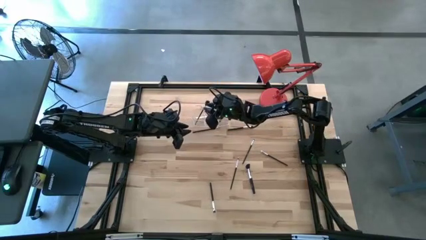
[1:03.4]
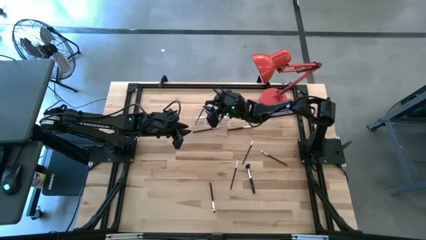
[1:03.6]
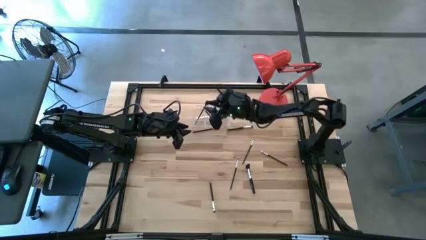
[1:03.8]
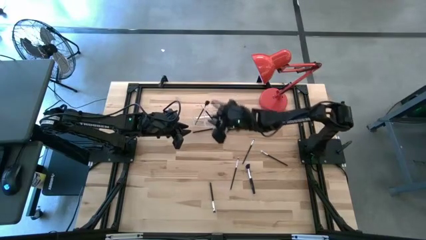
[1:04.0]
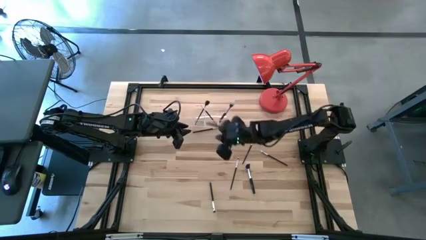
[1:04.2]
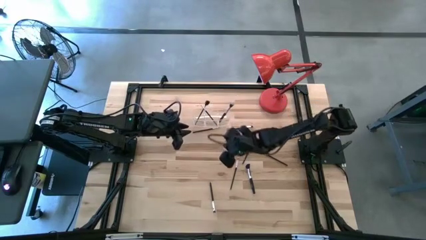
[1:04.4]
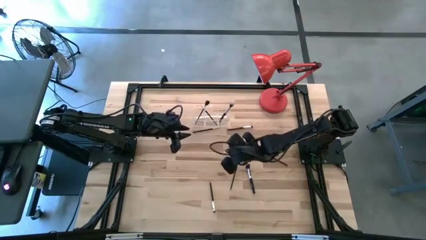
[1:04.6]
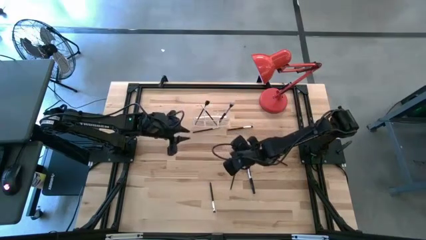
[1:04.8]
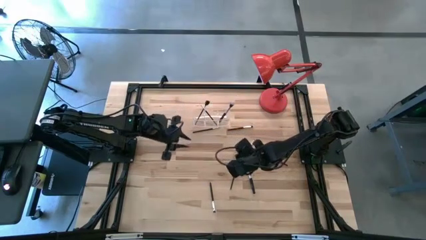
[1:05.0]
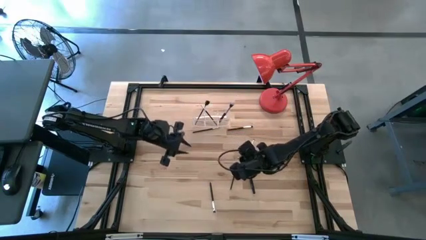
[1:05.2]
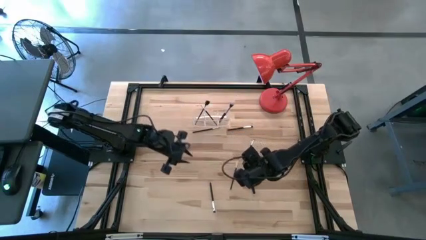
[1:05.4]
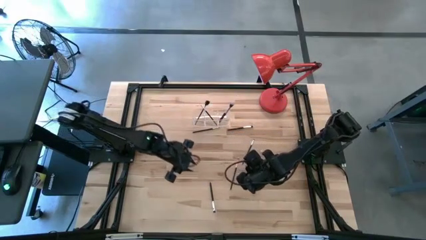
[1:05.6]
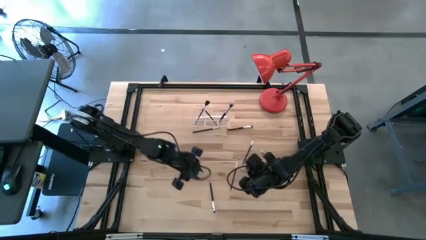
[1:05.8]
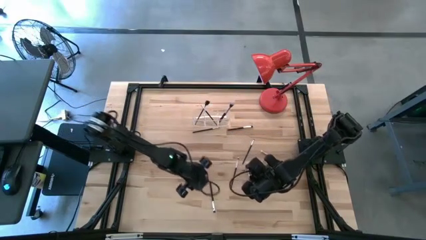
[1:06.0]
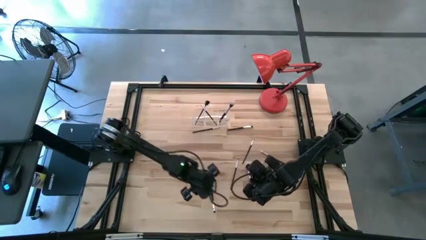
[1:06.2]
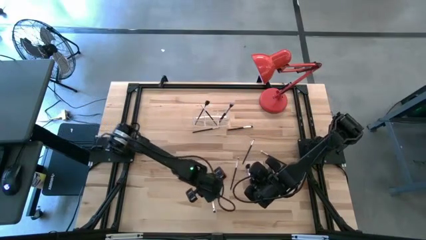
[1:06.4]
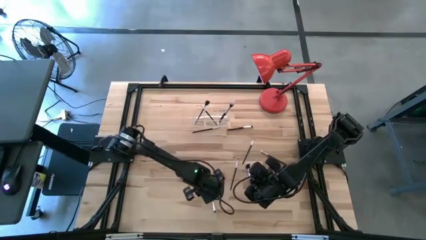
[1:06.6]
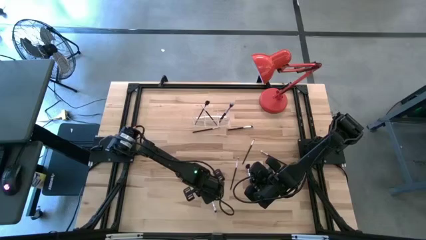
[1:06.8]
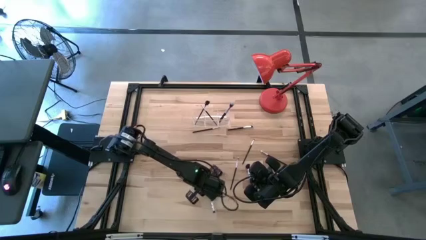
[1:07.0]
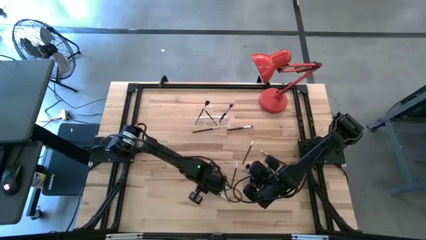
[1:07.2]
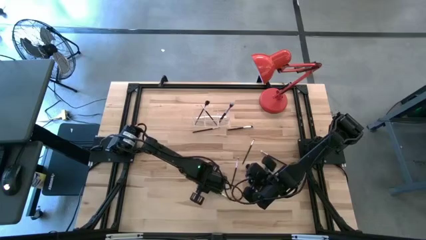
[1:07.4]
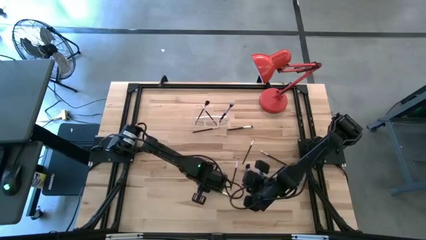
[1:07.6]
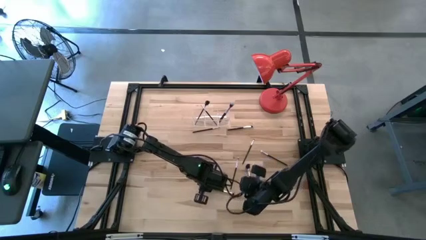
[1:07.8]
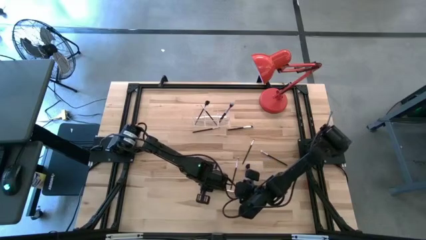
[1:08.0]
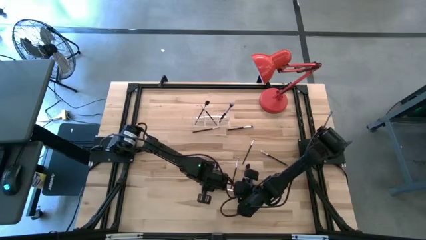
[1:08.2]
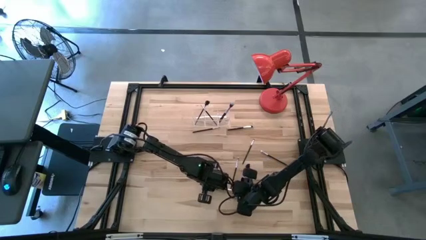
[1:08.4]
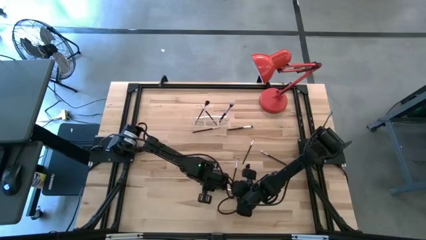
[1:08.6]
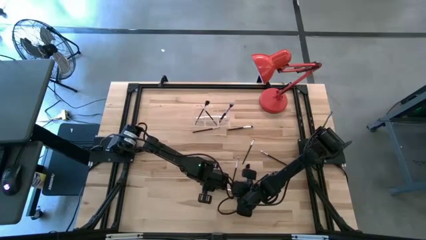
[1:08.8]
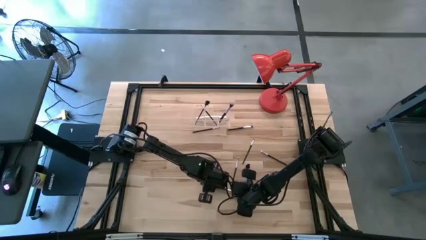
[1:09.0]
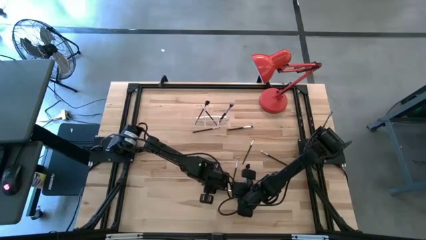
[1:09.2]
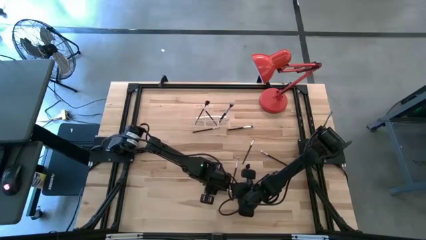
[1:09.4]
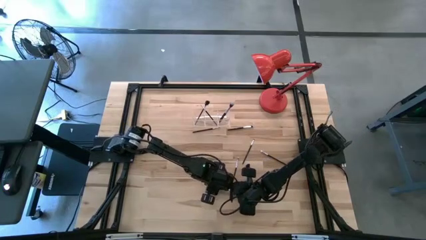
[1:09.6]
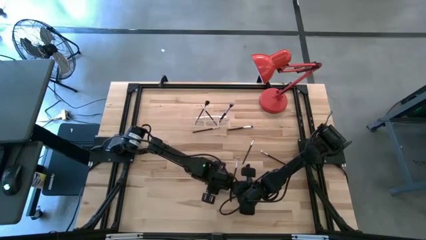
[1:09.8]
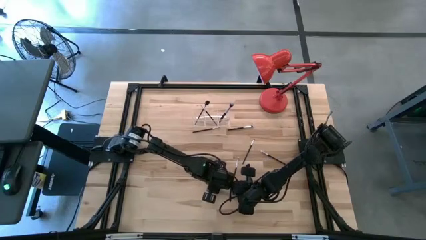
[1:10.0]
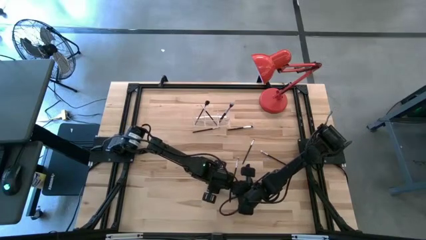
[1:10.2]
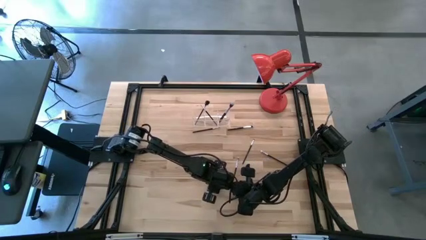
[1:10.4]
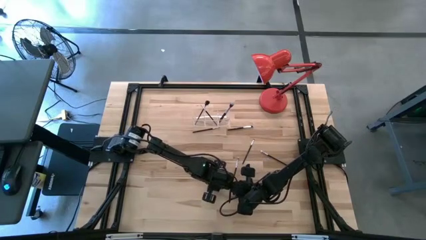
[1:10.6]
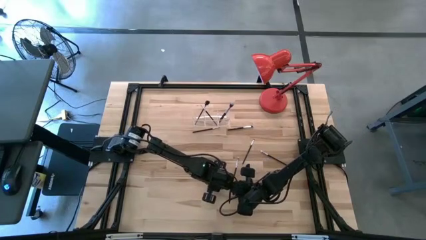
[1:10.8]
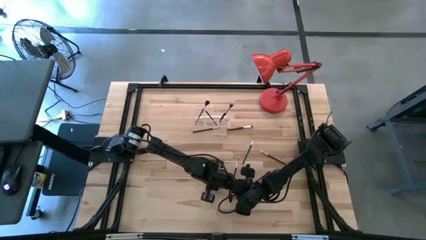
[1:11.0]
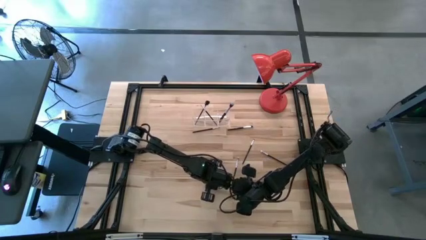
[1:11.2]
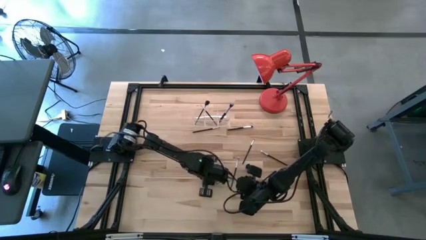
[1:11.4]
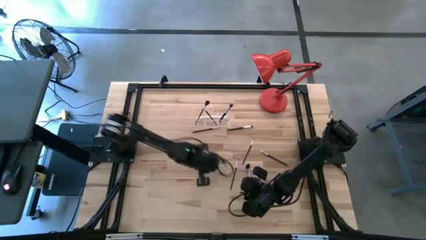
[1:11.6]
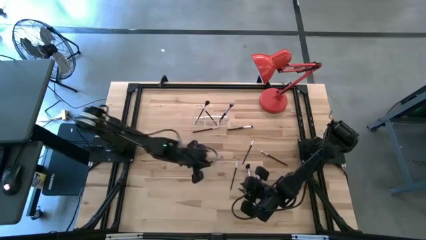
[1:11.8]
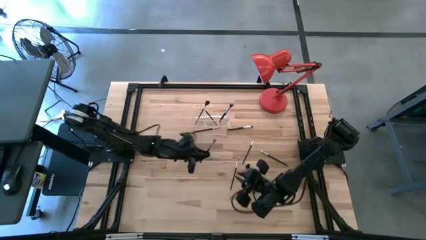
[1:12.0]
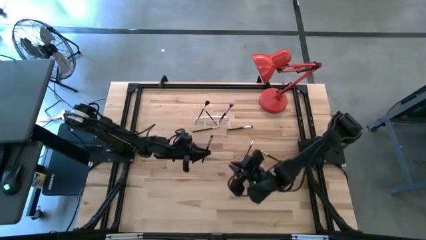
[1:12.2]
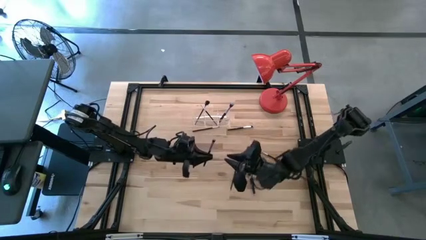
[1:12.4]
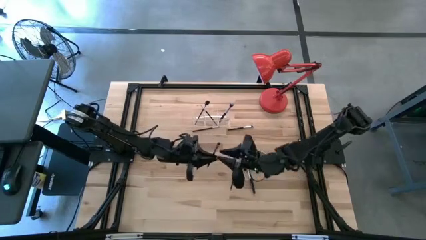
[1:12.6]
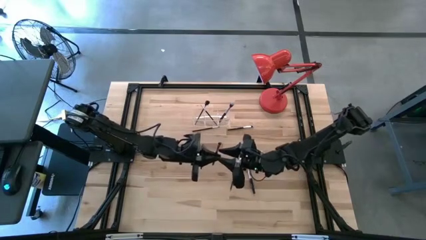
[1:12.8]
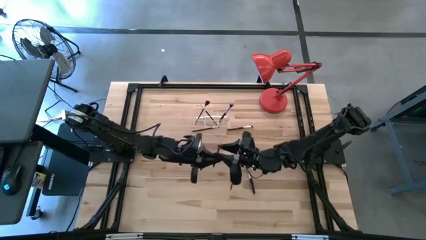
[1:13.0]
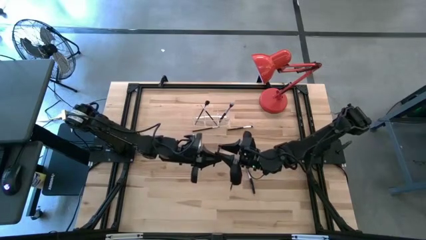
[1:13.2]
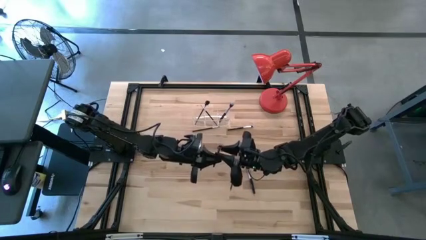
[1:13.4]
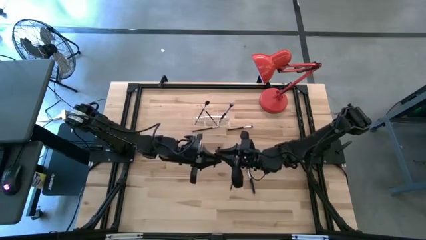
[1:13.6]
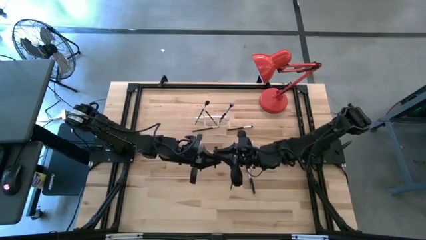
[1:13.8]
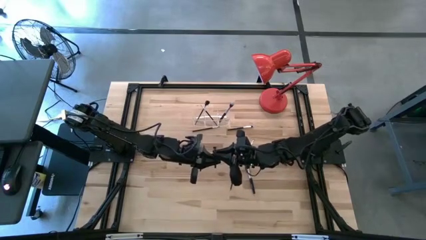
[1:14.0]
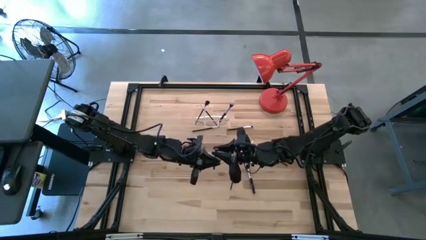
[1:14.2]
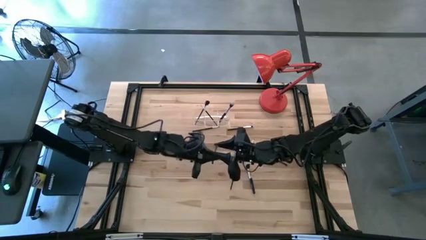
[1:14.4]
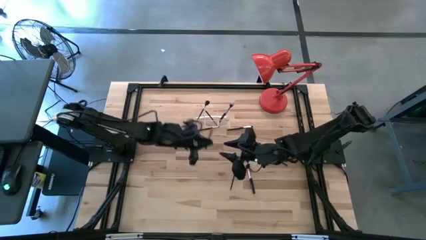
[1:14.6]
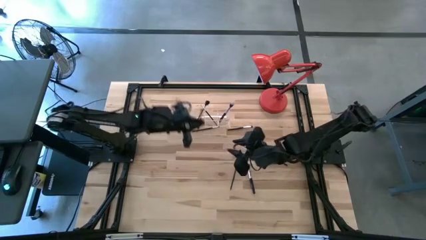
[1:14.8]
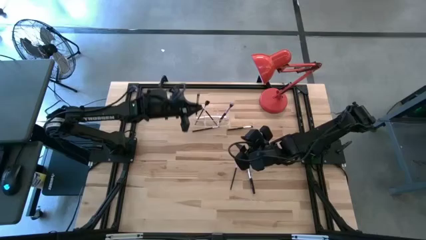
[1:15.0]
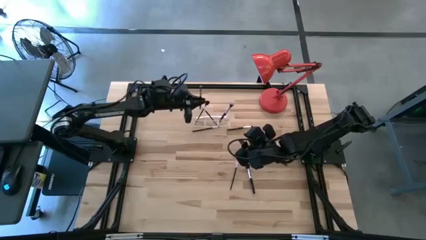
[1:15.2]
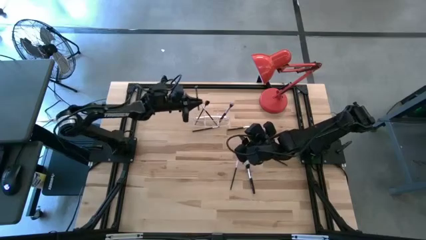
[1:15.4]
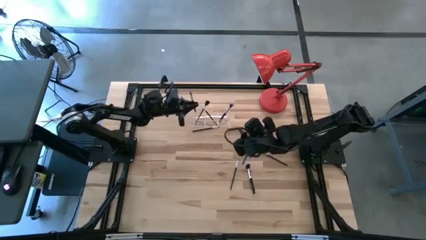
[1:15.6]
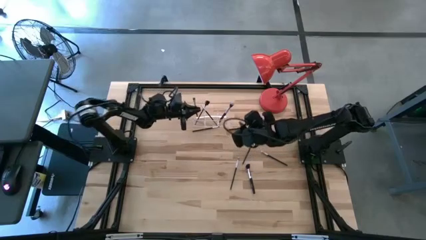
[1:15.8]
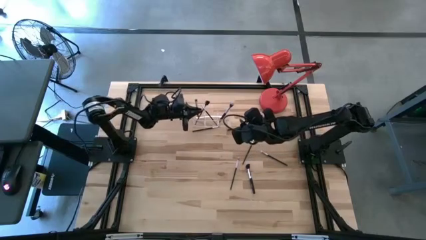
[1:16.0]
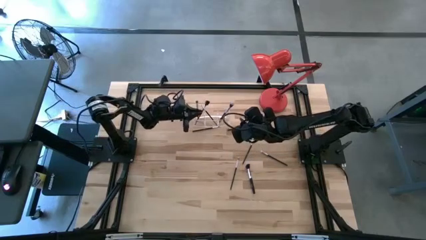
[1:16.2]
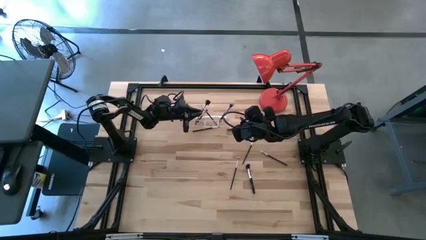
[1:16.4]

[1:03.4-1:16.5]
Task: Put items in baskets/containers
Put the black foundation brush into the transparent organizer

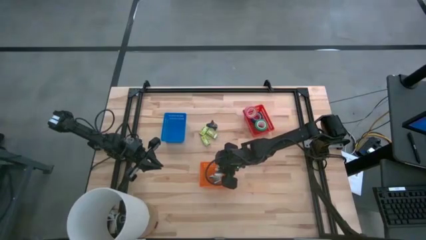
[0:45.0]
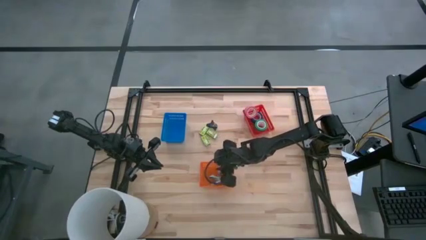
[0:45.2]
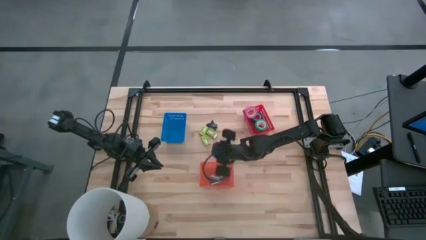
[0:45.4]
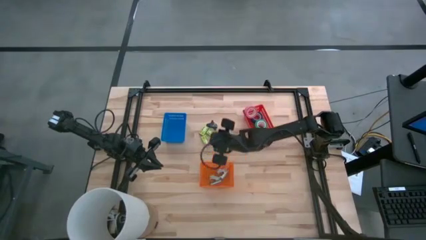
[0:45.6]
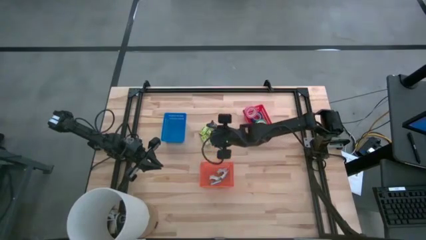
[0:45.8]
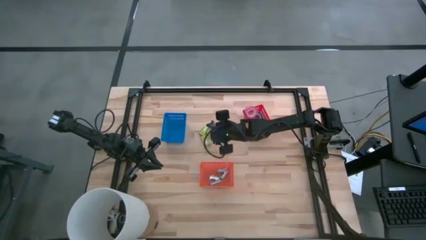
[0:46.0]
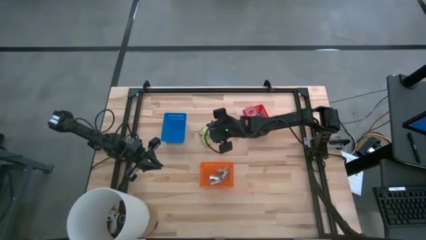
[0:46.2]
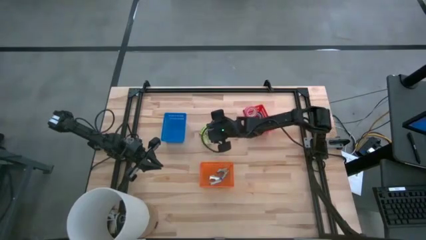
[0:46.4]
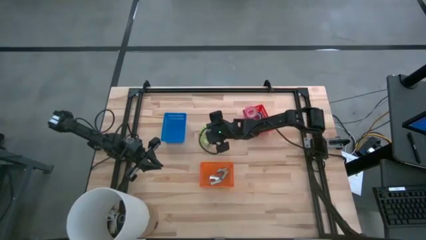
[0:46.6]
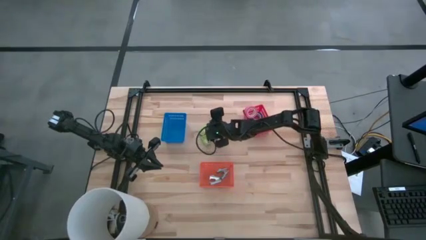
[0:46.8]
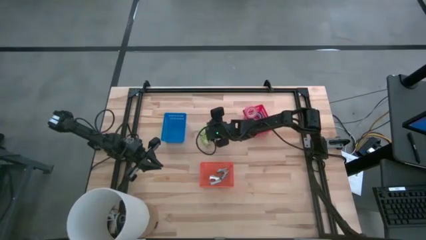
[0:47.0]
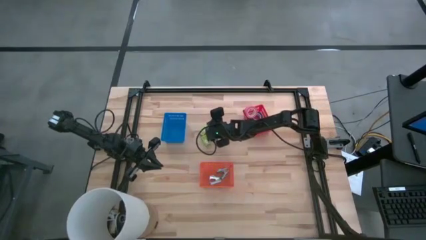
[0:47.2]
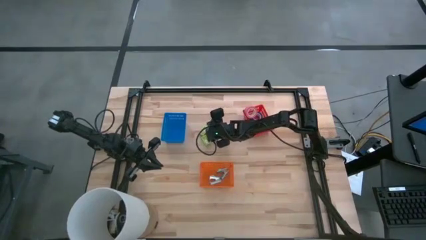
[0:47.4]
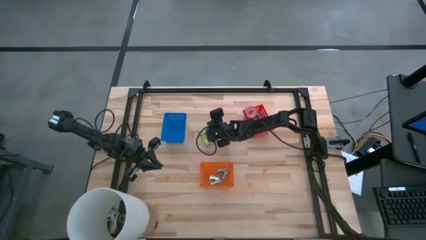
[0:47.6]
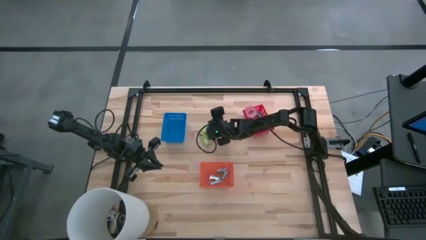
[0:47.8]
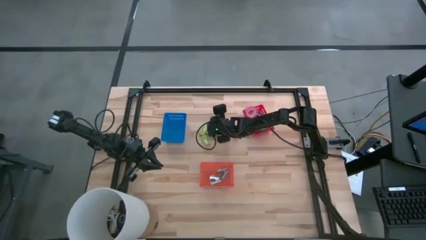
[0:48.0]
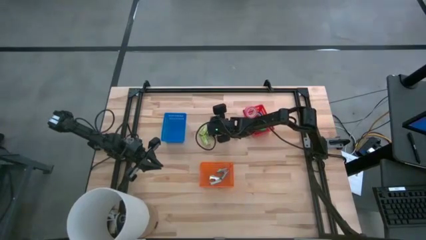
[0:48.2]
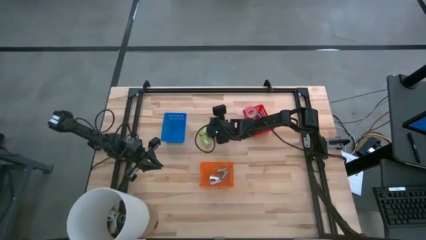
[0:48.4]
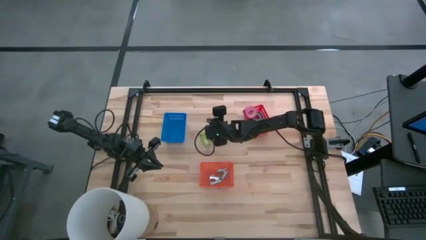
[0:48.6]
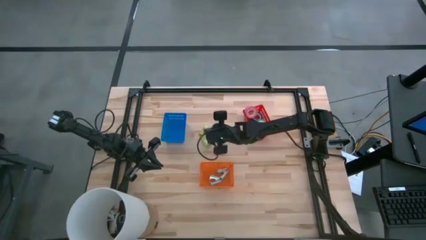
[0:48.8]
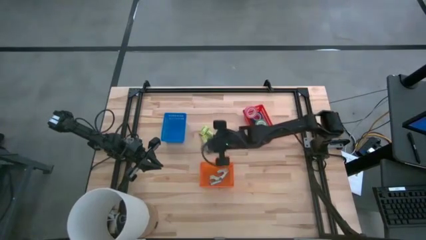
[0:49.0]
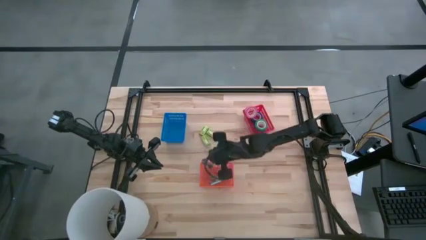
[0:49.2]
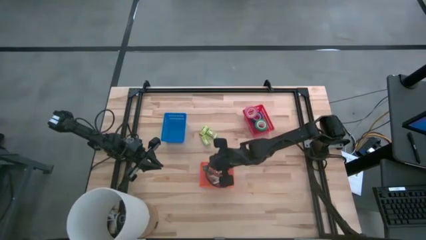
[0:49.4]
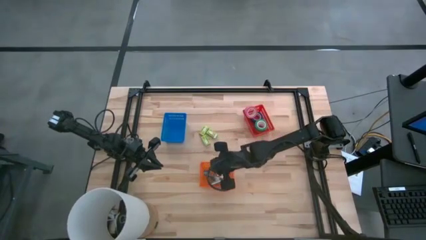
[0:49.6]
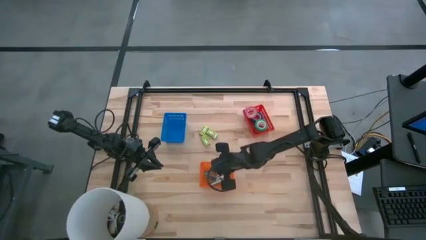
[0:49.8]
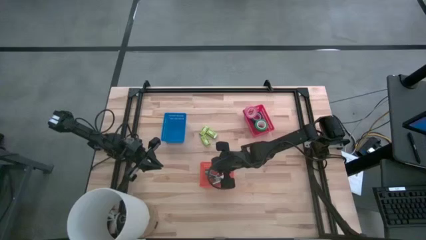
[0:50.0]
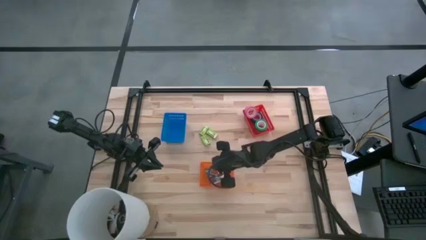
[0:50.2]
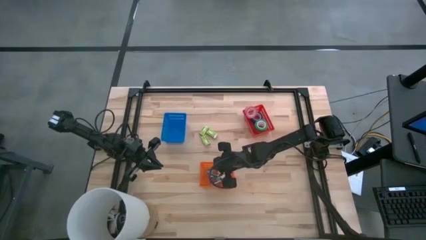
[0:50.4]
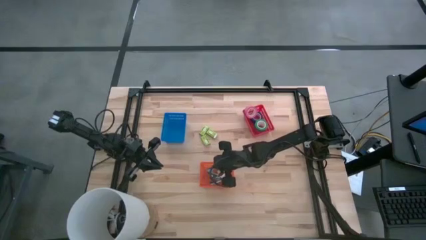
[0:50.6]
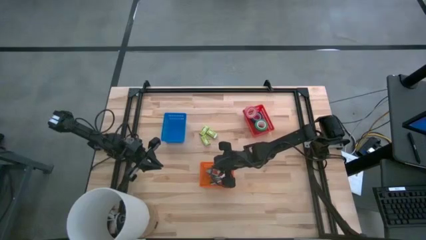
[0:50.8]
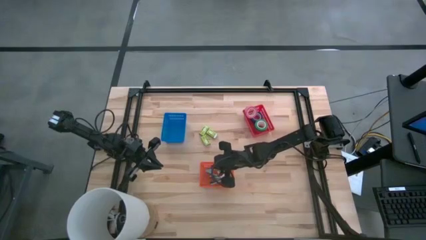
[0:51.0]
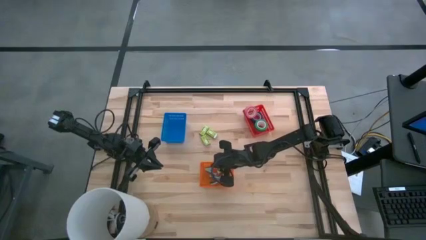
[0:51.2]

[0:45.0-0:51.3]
Task: Pick and place Stapler, Stapler remover, tape
Put the black stapler remover into the orange basket
